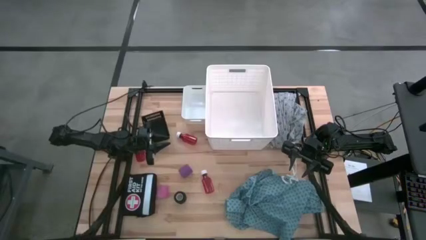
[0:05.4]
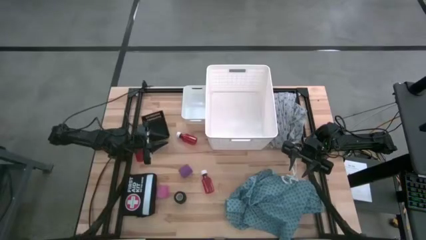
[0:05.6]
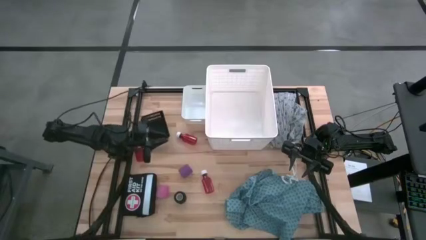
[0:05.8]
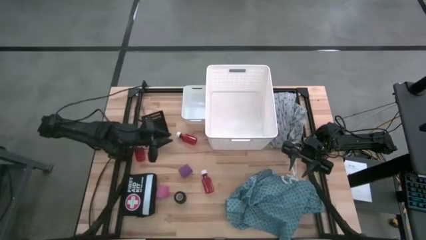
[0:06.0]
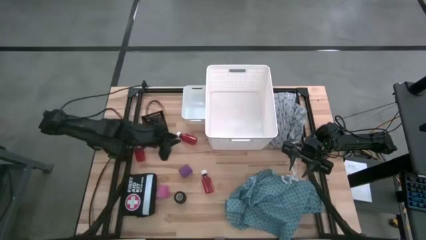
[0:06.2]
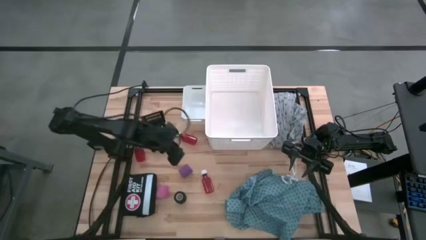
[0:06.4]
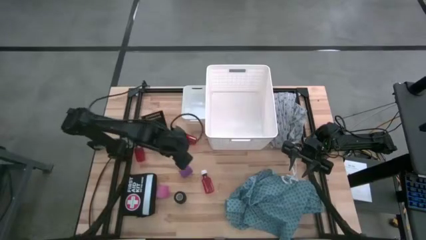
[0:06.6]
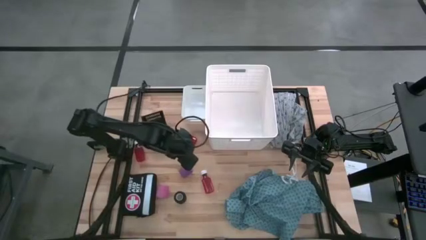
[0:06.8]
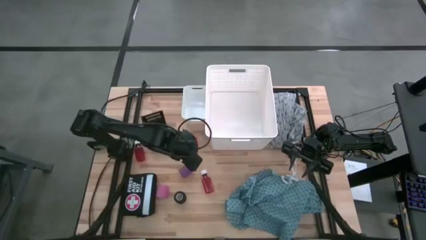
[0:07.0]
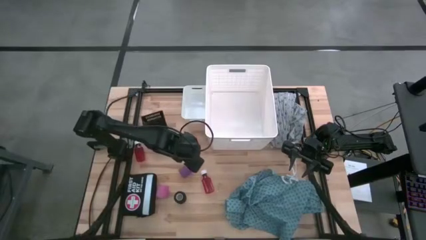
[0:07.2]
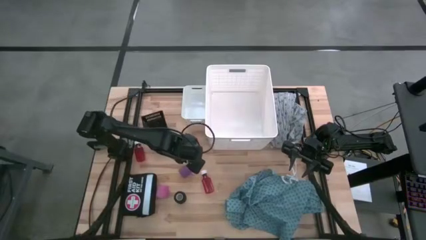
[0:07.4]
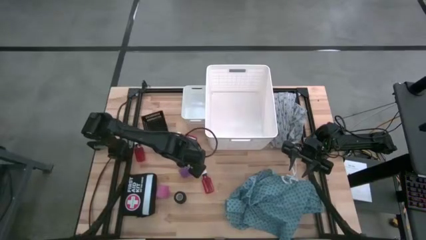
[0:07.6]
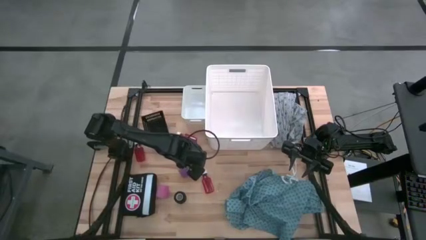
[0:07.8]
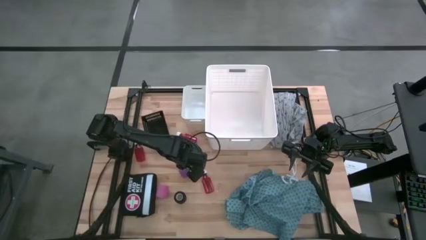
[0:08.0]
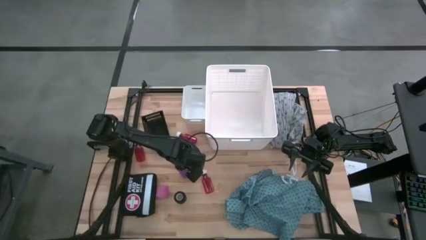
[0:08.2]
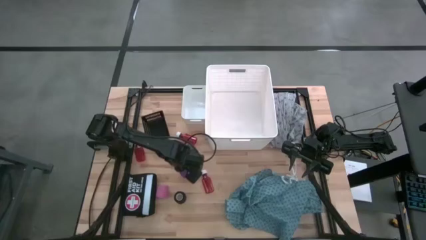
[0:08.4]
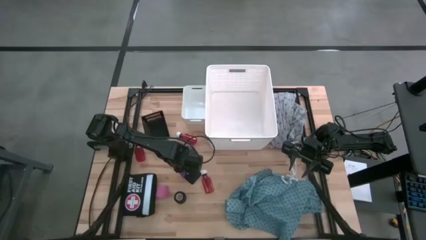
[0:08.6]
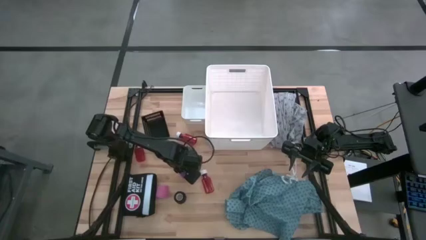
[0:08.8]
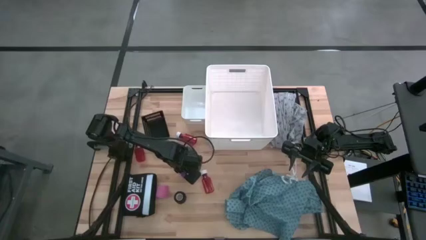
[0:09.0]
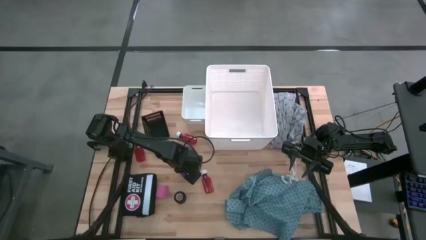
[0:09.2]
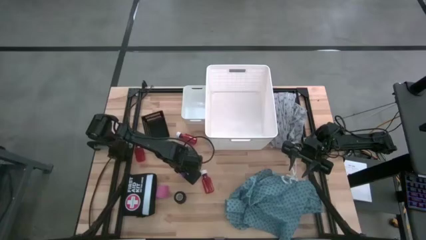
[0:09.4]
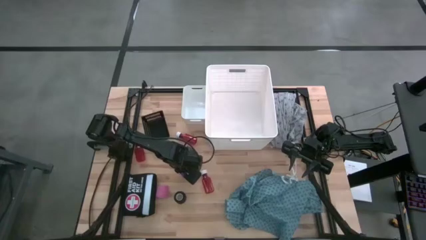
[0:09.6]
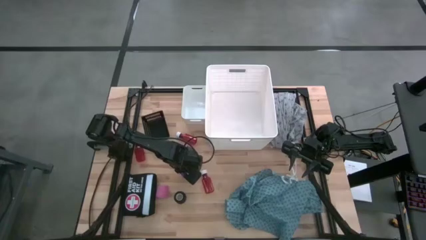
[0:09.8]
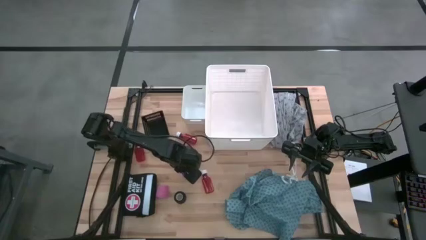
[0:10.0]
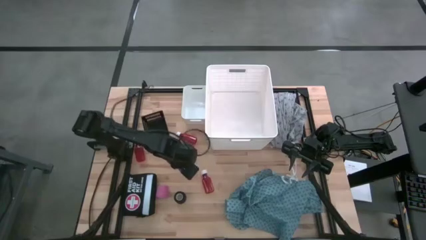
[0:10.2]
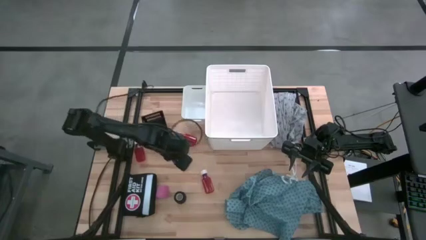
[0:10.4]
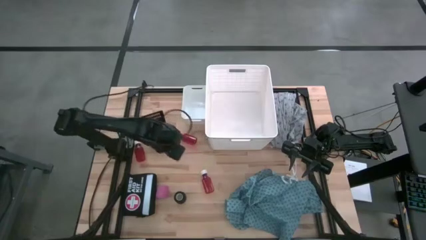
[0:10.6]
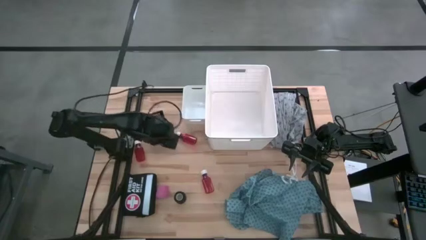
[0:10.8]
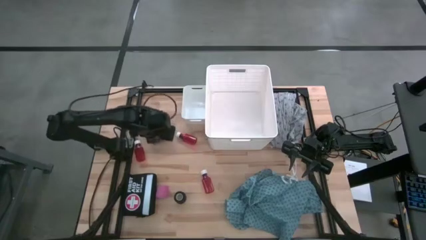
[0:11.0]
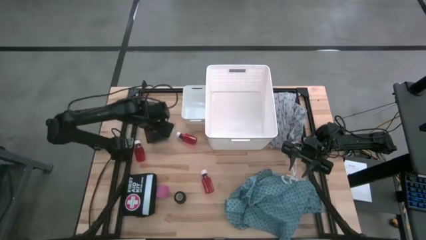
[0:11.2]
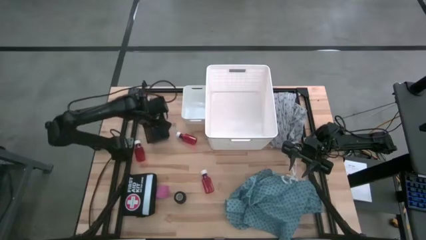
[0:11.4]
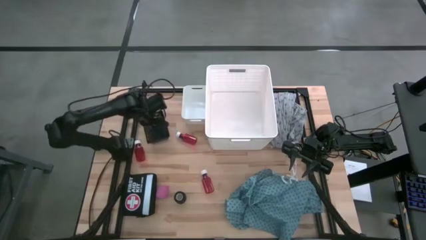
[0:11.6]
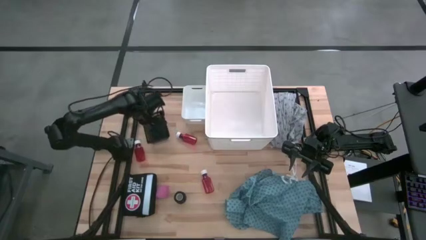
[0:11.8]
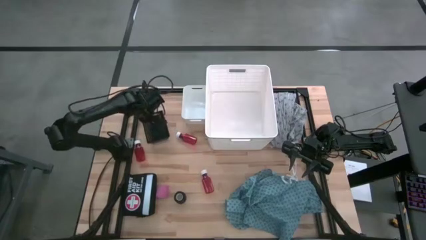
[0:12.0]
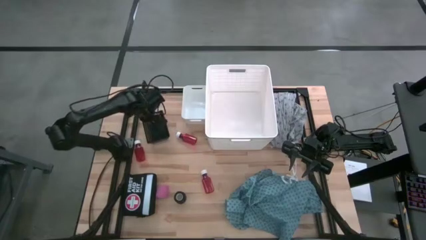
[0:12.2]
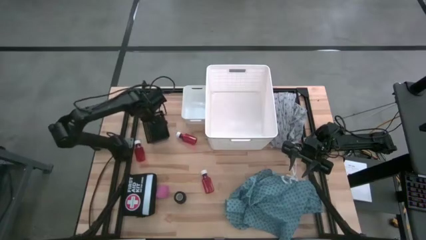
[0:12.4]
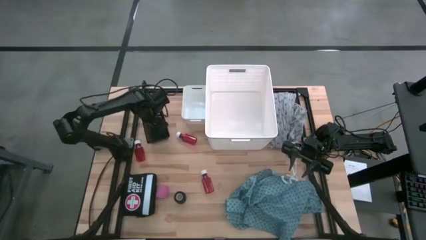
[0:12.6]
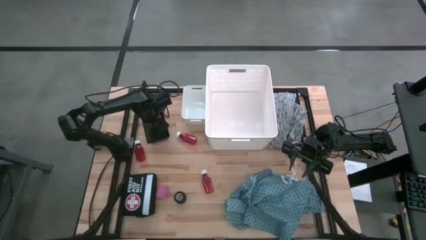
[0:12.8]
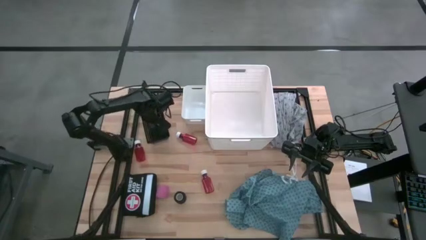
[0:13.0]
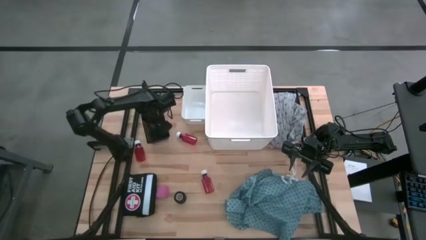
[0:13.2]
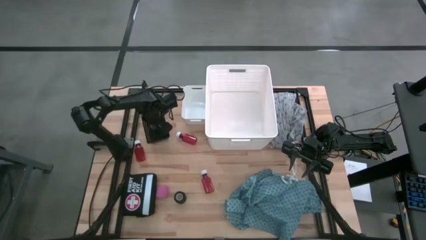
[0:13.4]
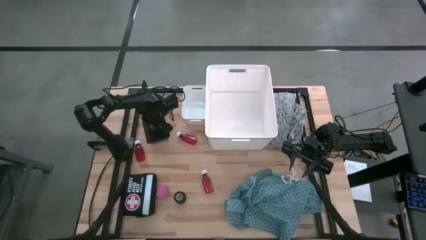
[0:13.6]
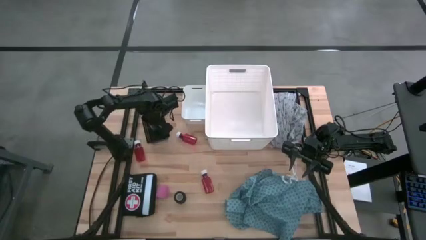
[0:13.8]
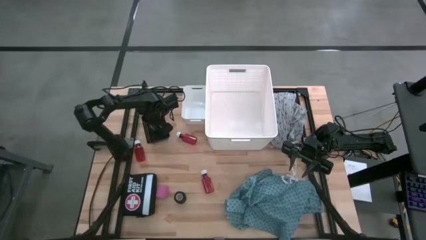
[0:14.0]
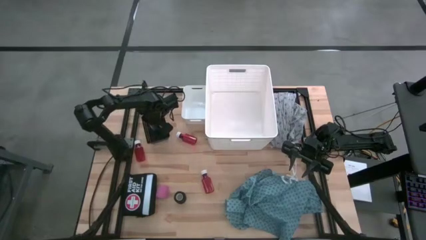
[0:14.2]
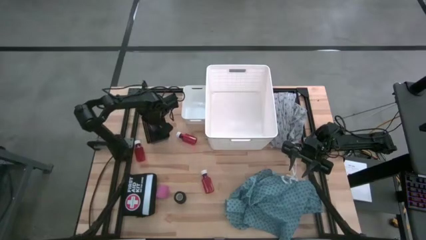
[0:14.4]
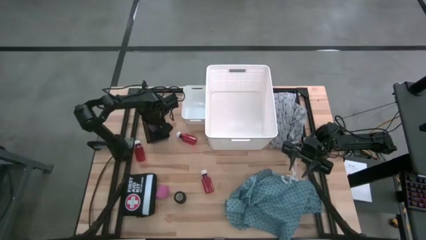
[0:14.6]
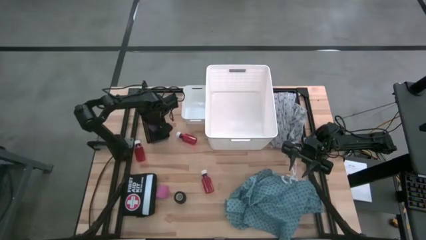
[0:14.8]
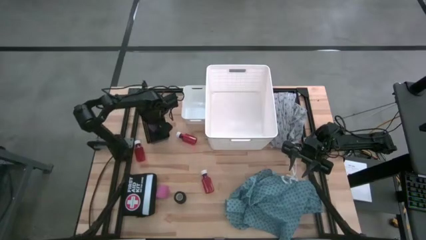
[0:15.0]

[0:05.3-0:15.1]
Task: Pick & Place Medicine items
Put the violet bandage into the black bin

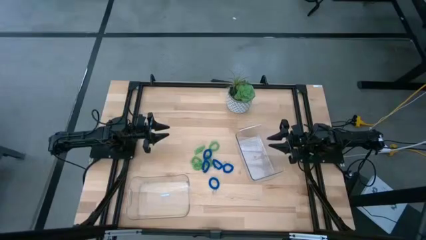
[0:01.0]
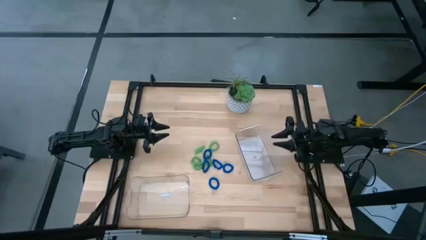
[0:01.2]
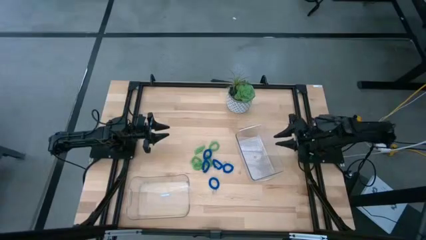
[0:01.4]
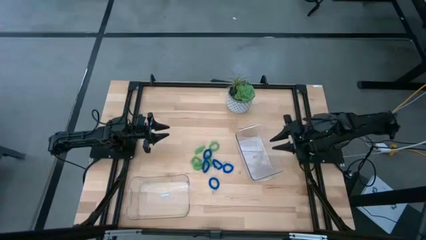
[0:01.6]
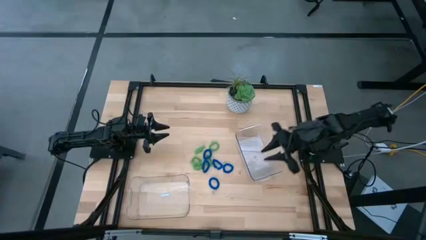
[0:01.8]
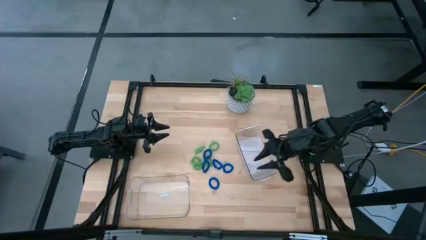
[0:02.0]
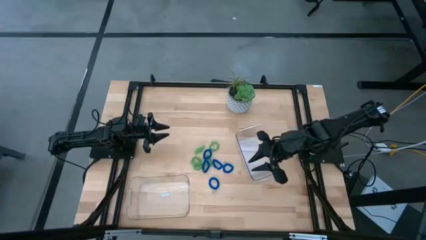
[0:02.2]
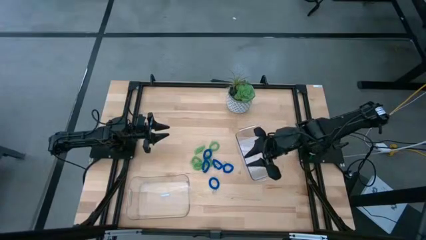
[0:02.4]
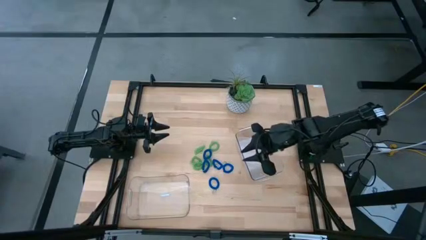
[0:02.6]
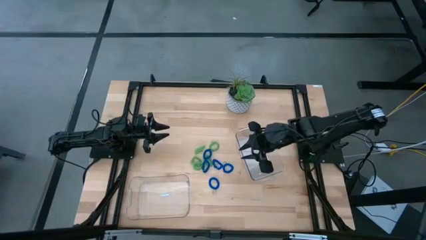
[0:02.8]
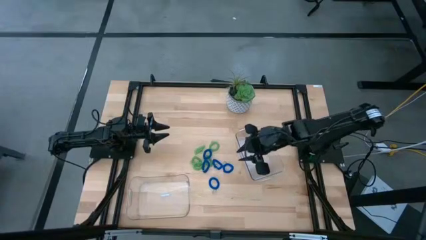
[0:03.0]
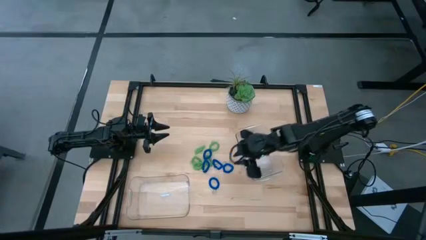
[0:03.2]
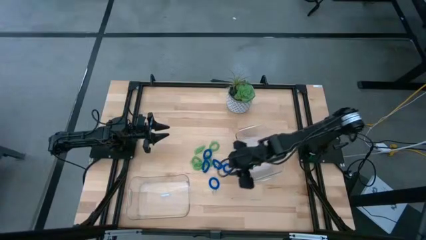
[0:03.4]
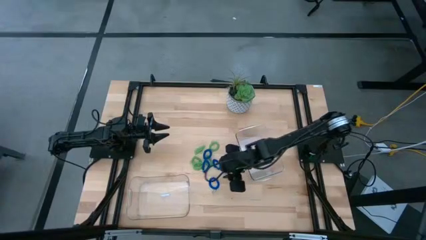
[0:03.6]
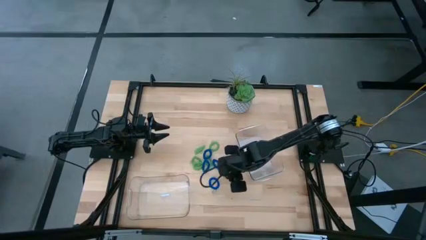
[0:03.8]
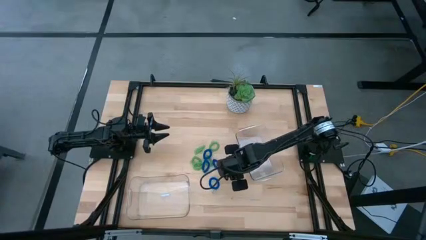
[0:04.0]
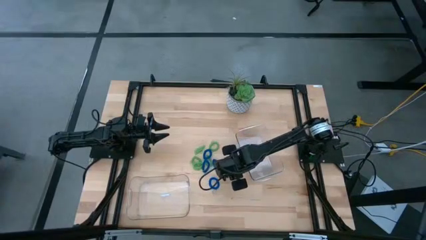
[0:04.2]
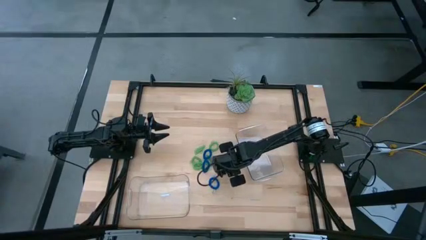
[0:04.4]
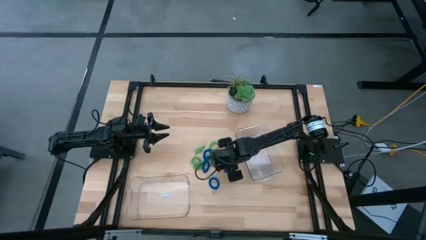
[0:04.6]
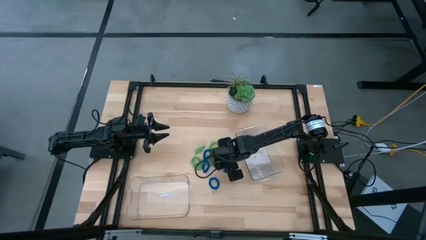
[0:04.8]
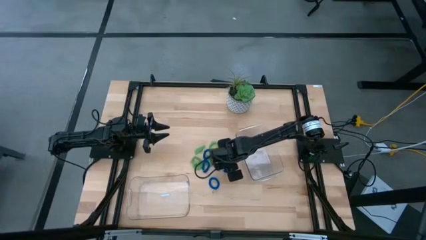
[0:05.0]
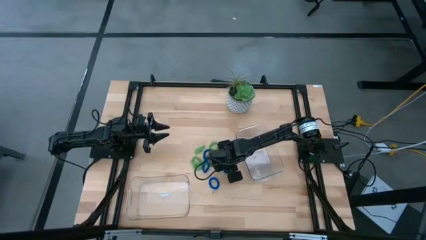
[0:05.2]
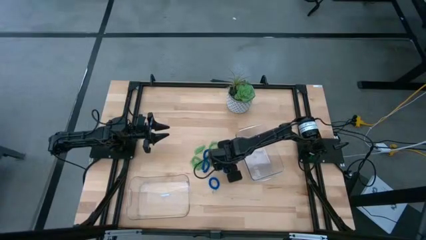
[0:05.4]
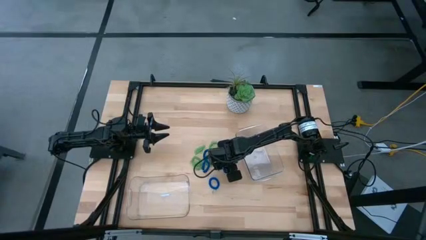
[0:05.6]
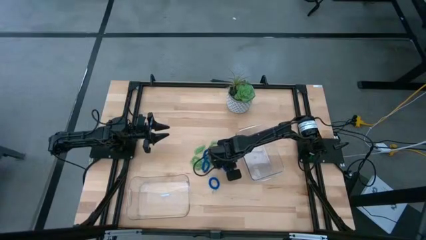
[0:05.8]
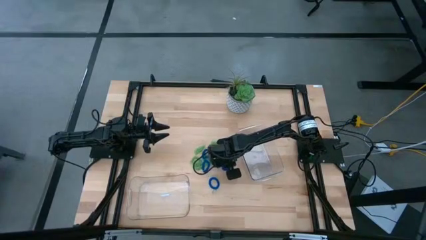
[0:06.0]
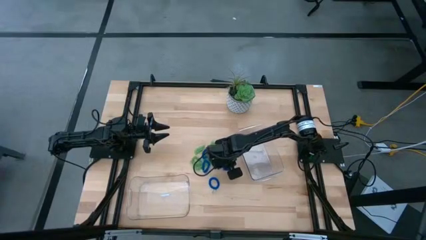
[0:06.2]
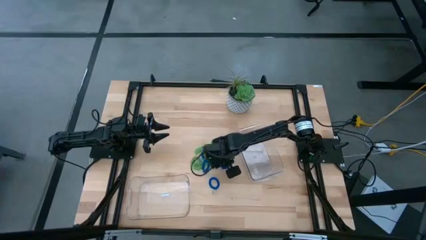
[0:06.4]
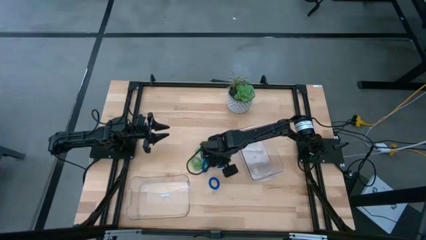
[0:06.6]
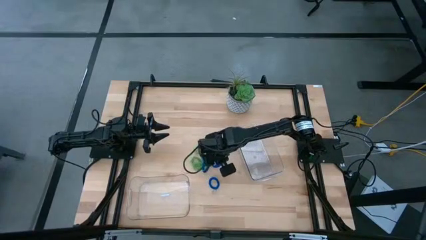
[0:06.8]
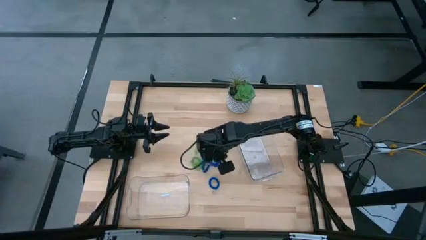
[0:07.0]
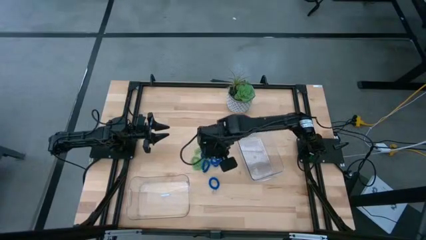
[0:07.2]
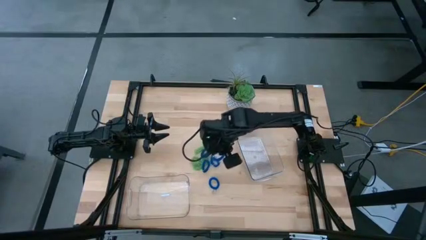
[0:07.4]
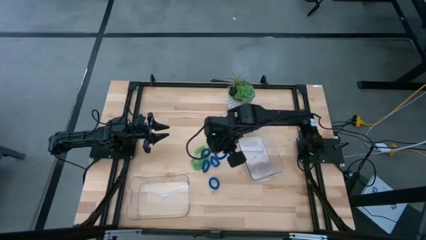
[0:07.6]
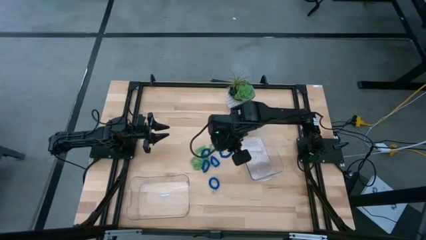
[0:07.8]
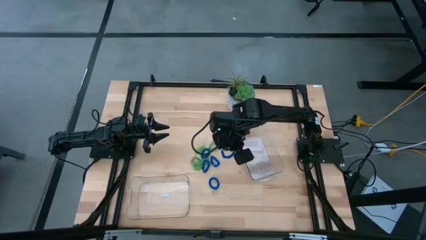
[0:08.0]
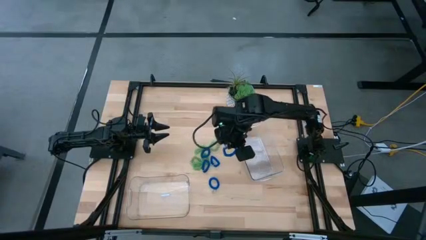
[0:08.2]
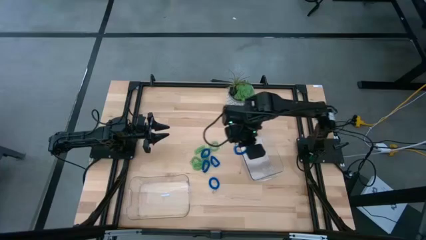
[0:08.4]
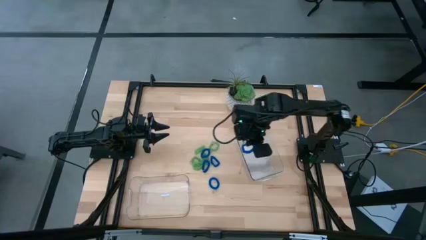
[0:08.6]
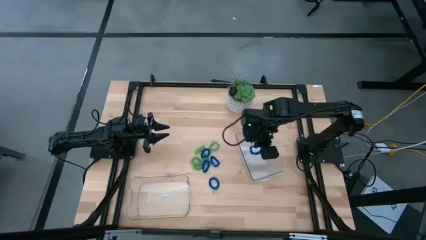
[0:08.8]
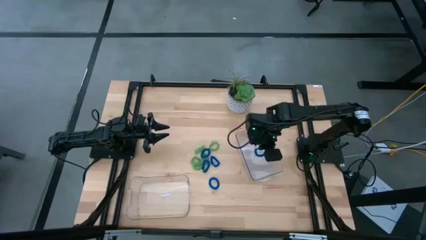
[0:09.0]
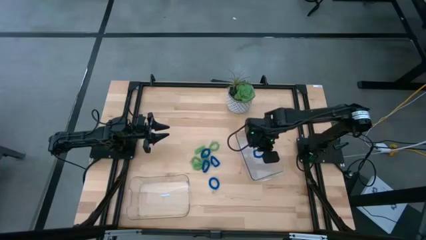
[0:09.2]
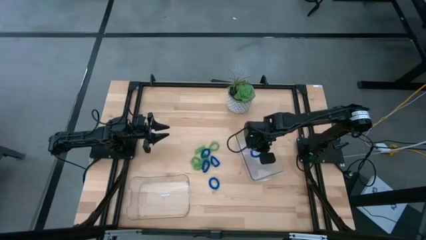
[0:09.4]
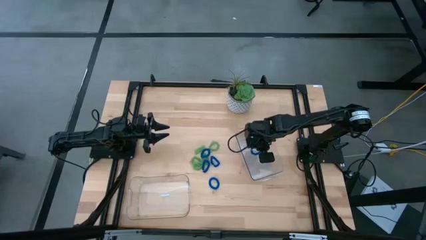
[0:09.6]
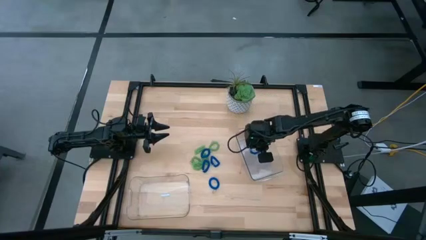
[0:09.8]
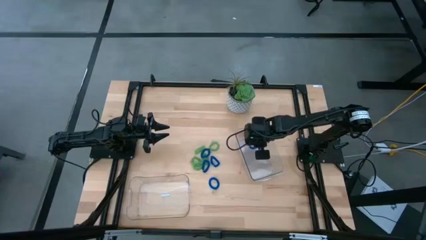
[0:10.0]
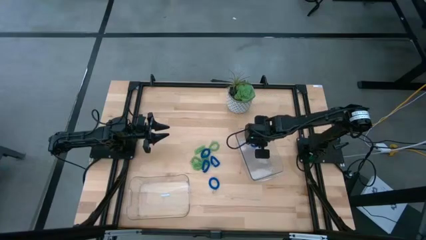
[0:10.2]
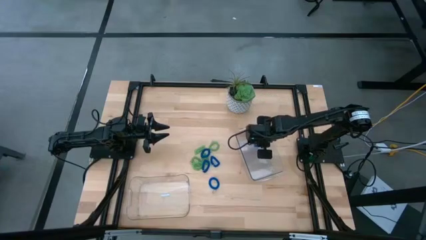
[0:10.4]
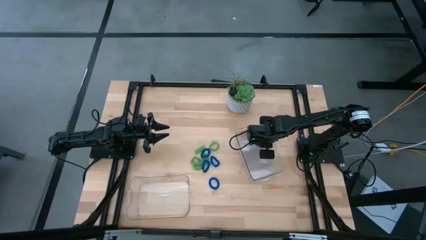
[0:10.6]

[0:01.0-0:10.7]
Task: Sort spring keychains
Put the blue spring keychain into the right transparent bin
